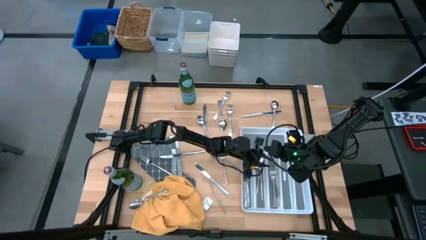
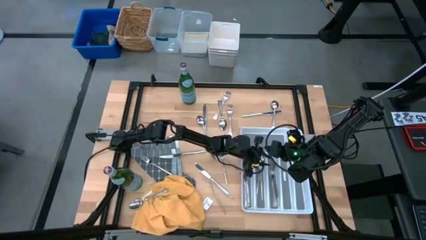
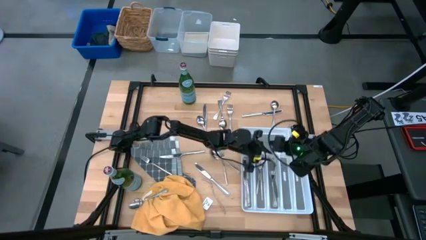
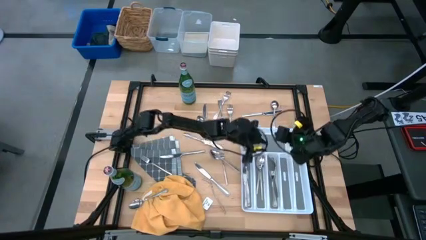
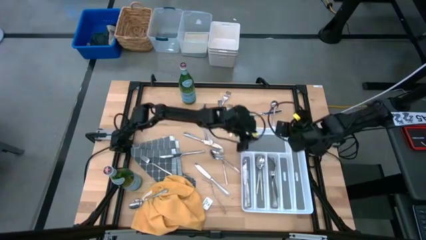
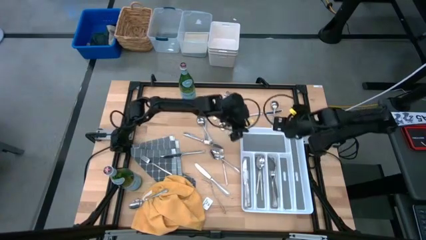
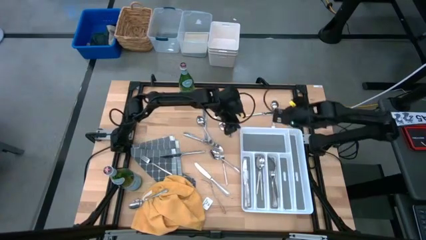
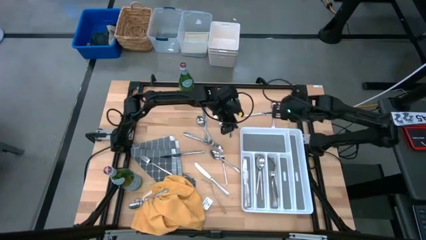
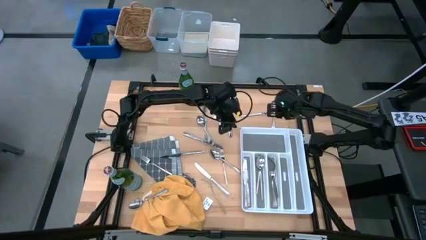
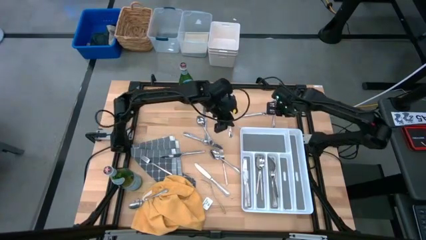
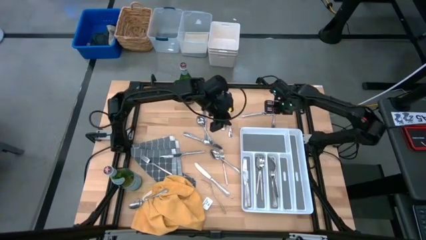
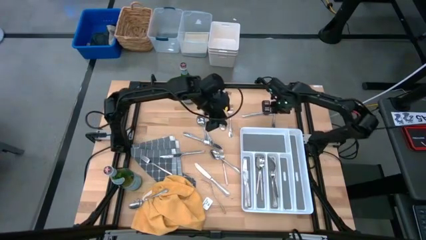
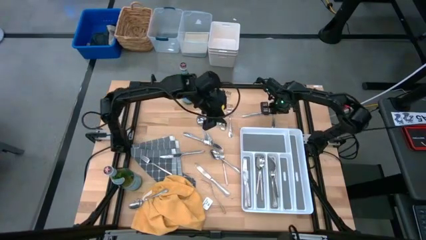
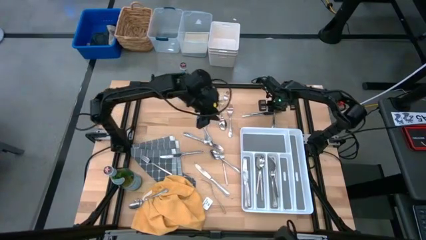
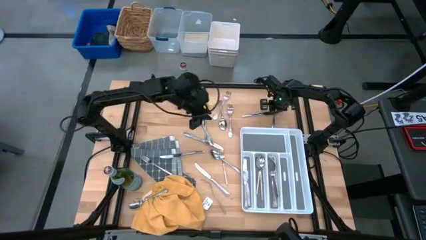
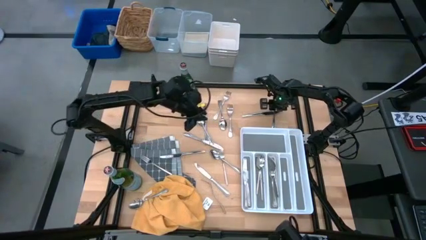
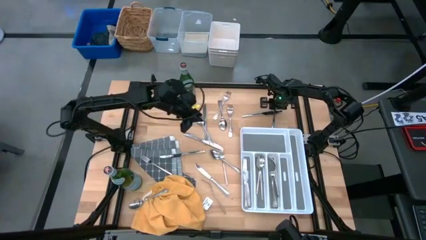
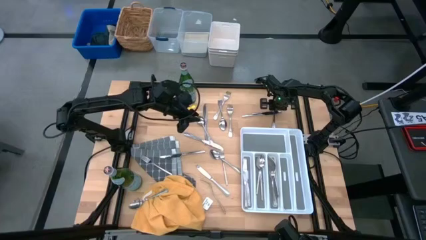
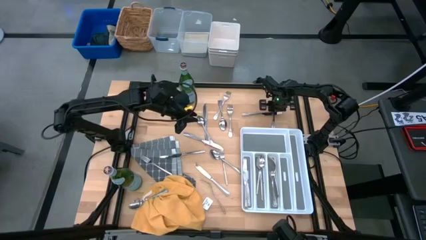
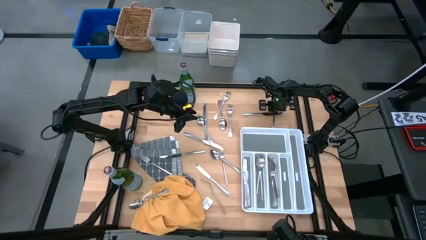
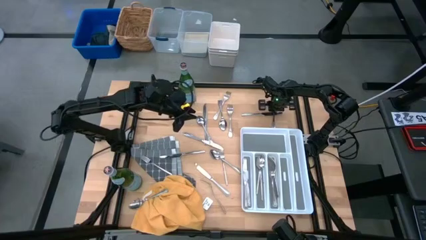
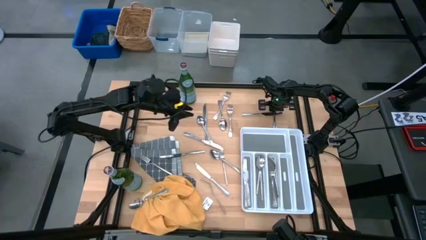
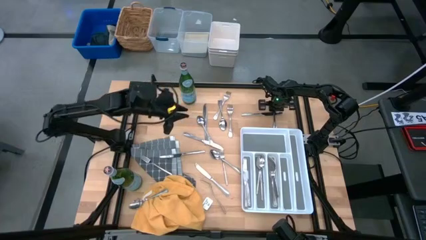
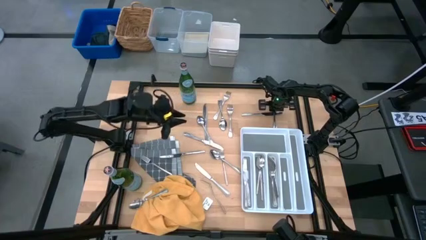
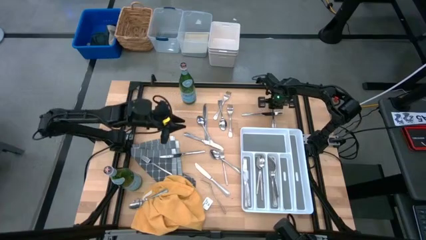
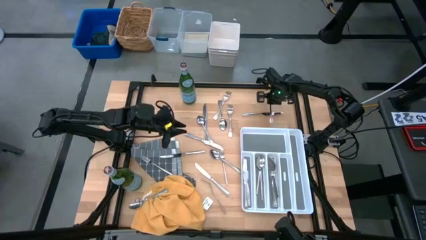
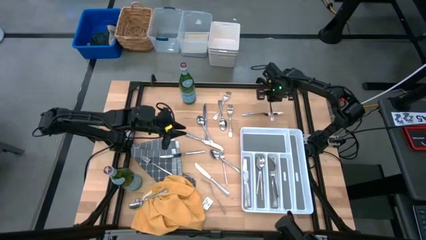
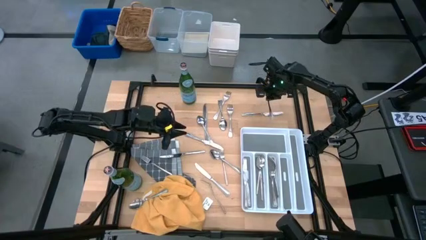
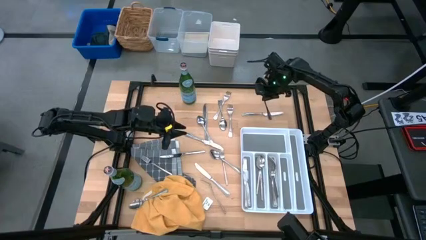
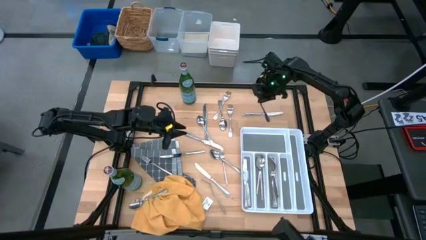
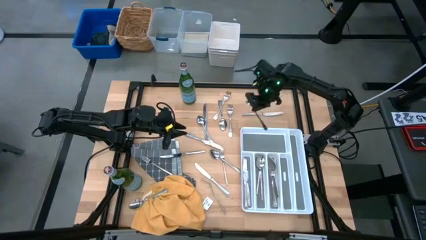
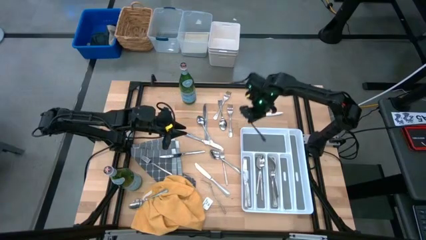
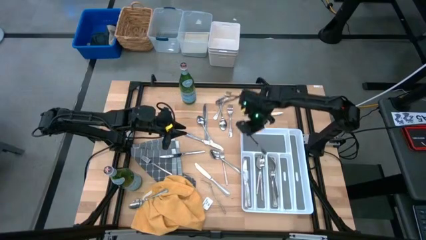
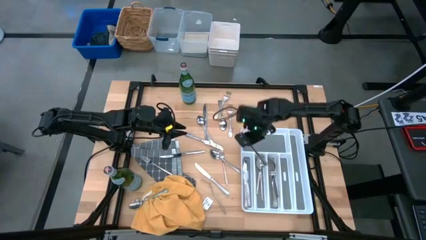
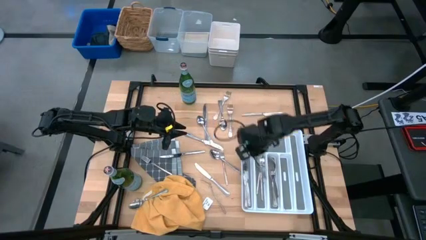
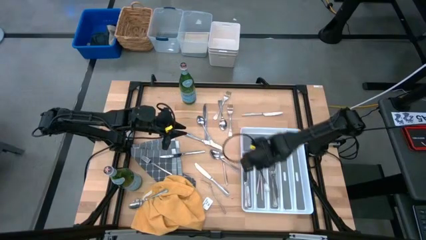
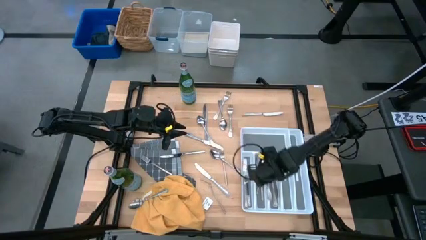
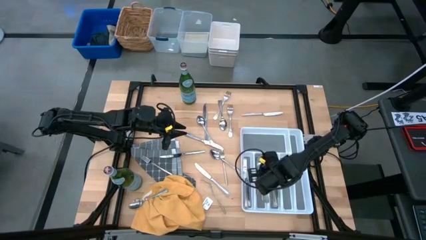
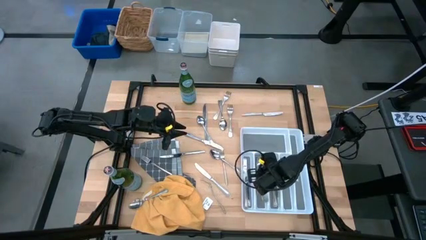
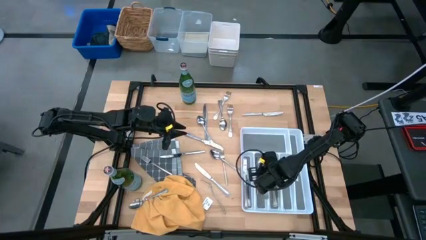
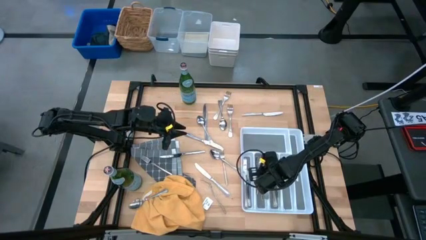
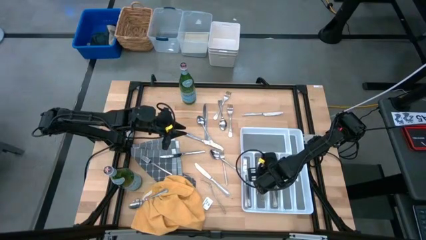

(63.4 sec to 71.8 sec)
Stack the silver spoon into the white utensil tray with the other silver spoons
